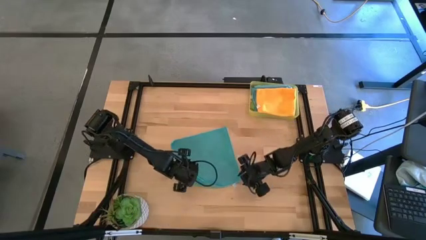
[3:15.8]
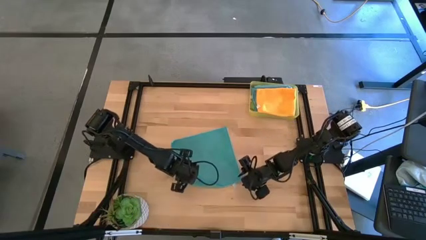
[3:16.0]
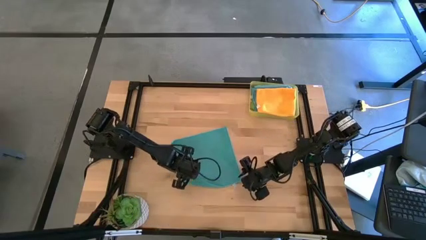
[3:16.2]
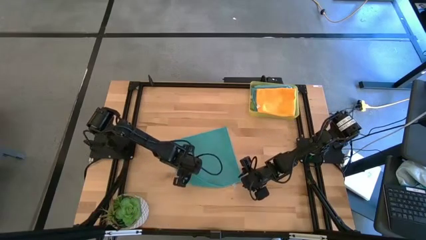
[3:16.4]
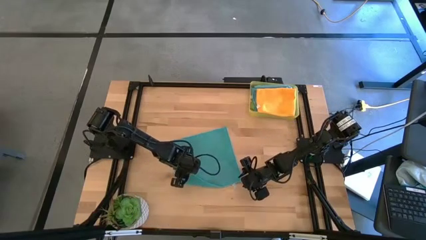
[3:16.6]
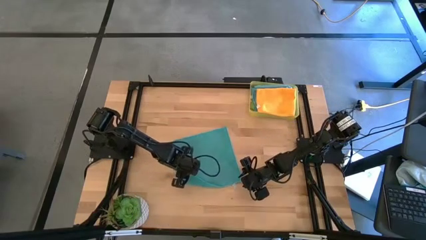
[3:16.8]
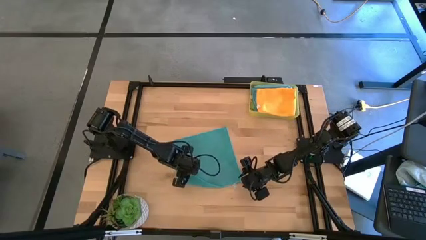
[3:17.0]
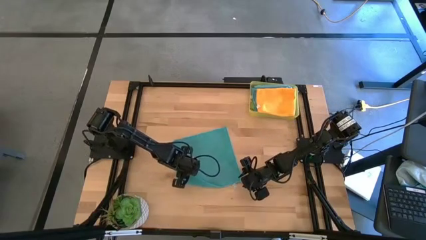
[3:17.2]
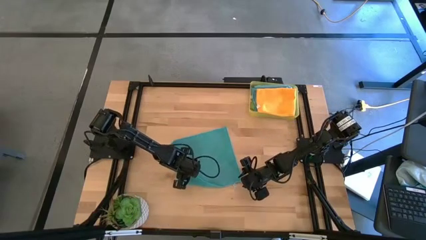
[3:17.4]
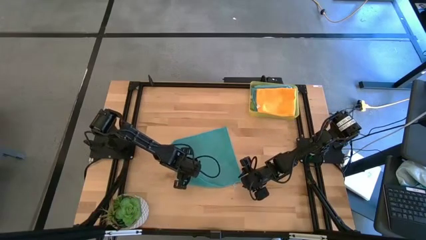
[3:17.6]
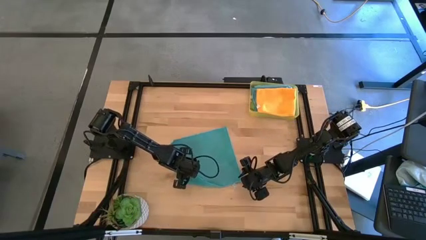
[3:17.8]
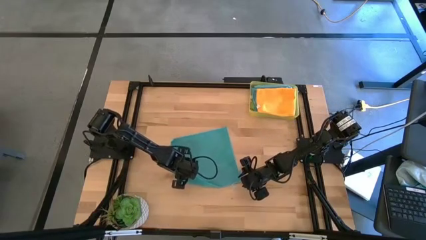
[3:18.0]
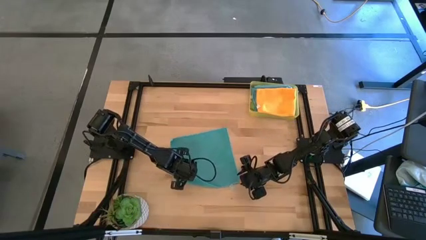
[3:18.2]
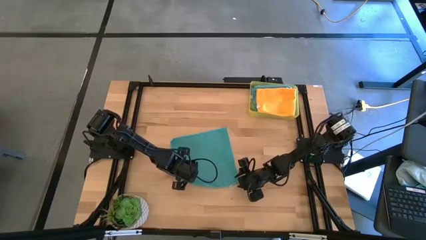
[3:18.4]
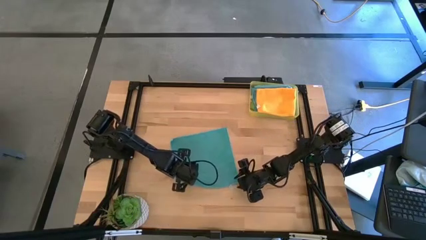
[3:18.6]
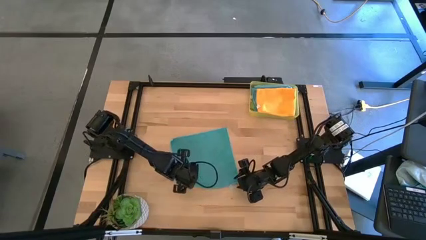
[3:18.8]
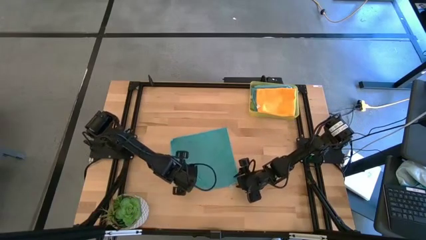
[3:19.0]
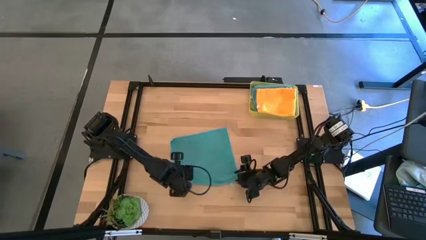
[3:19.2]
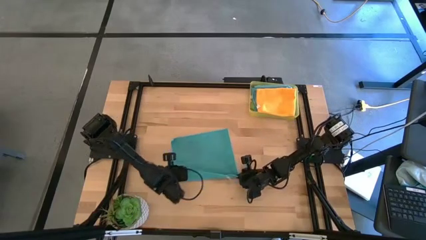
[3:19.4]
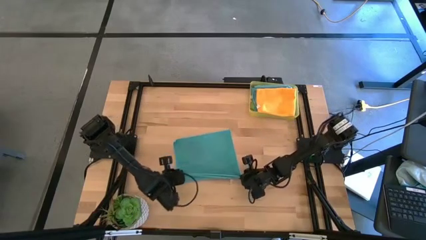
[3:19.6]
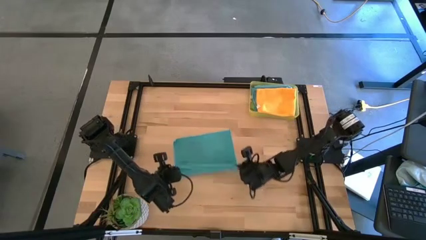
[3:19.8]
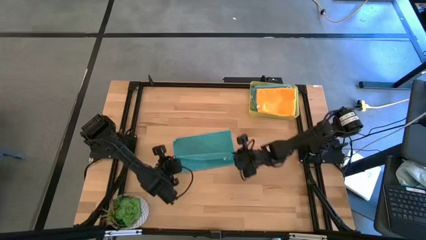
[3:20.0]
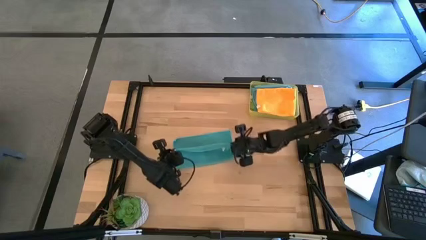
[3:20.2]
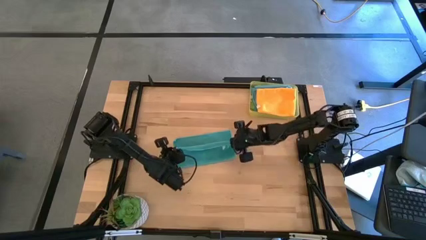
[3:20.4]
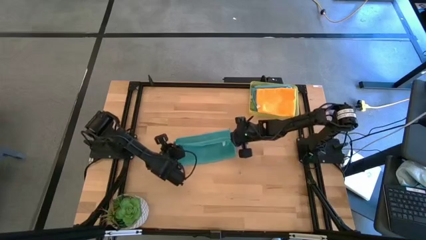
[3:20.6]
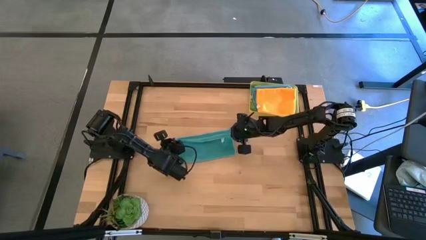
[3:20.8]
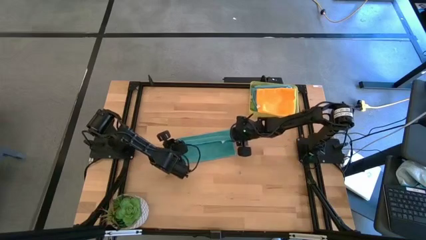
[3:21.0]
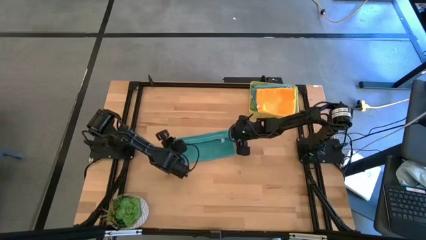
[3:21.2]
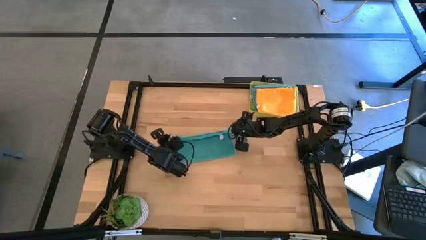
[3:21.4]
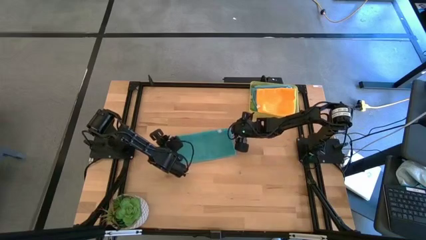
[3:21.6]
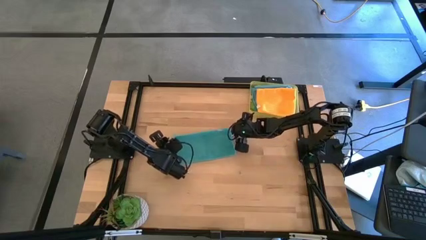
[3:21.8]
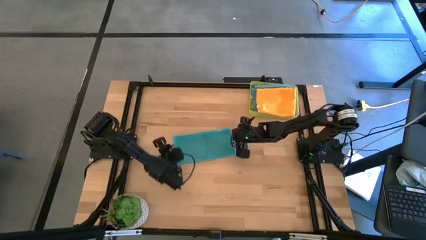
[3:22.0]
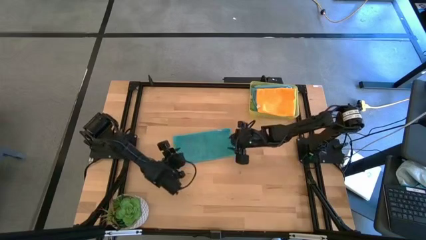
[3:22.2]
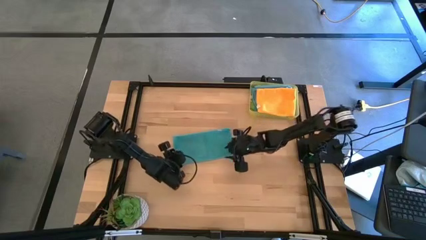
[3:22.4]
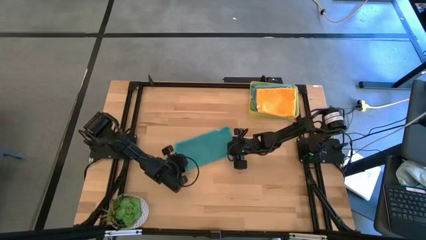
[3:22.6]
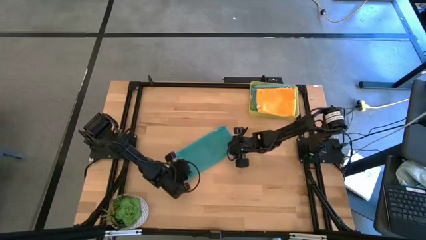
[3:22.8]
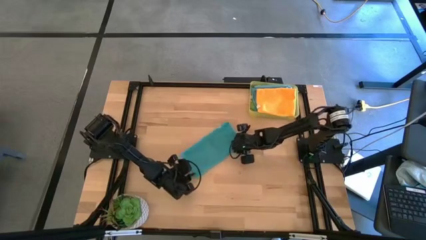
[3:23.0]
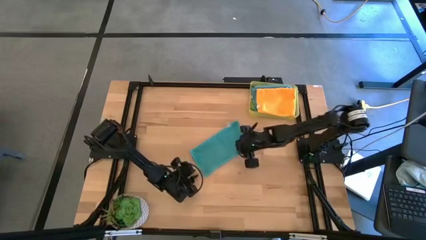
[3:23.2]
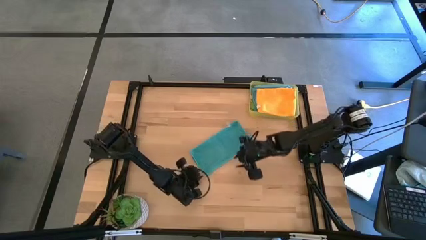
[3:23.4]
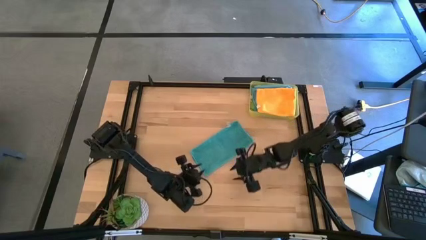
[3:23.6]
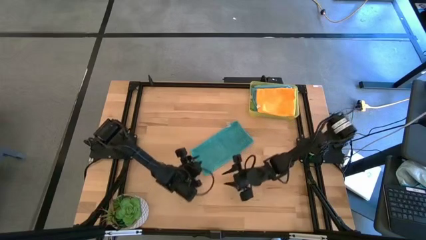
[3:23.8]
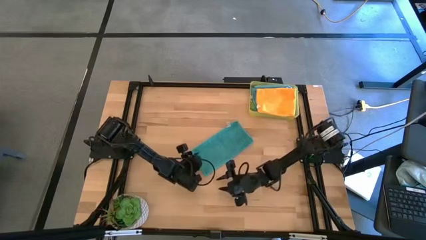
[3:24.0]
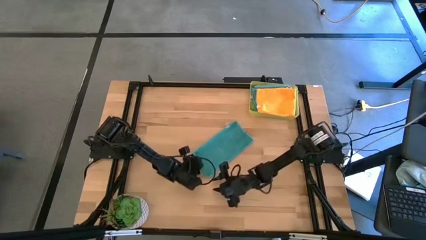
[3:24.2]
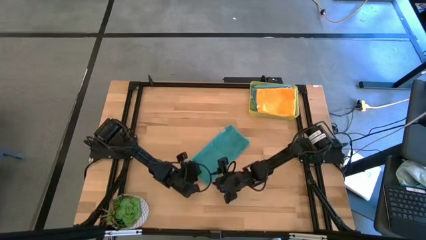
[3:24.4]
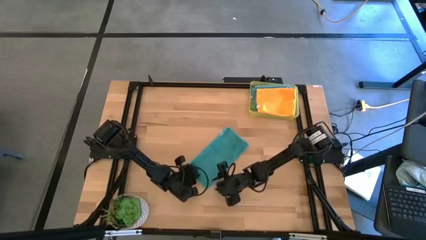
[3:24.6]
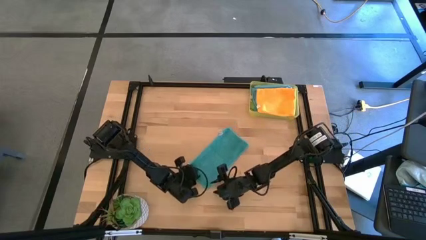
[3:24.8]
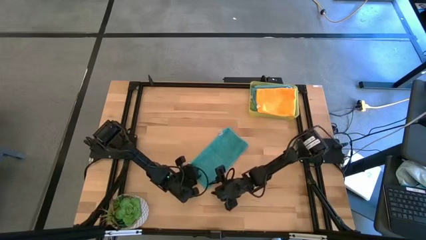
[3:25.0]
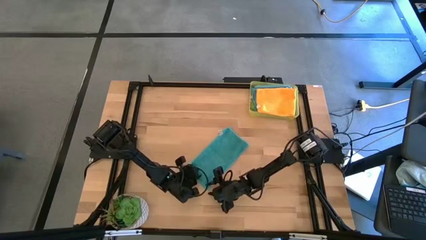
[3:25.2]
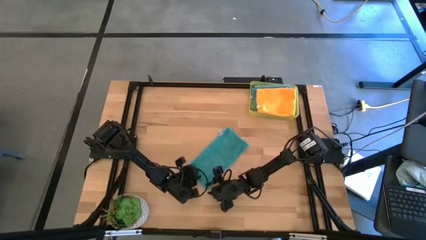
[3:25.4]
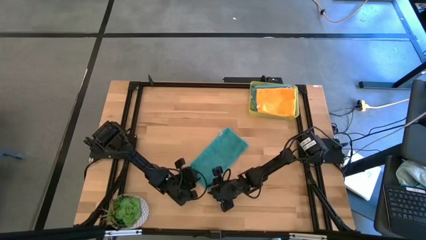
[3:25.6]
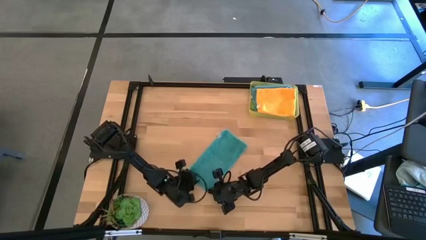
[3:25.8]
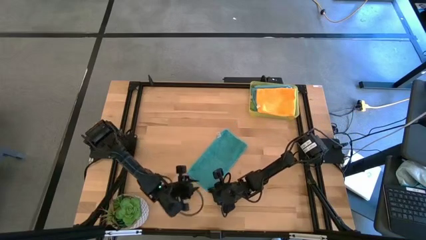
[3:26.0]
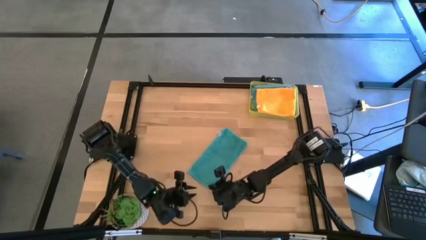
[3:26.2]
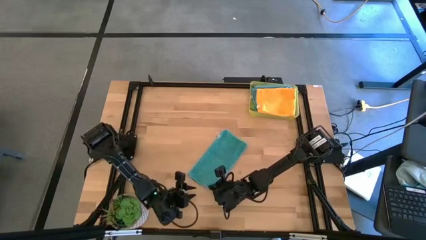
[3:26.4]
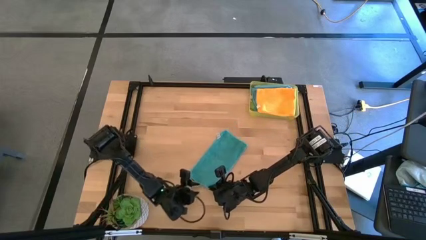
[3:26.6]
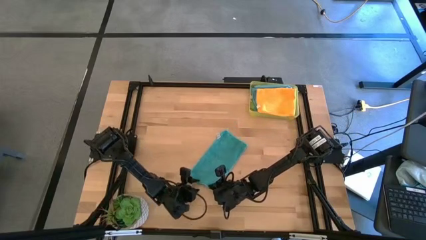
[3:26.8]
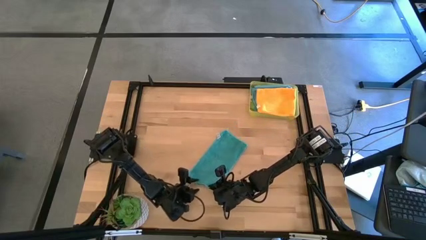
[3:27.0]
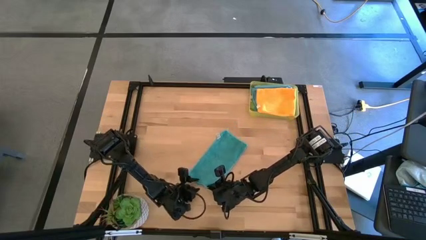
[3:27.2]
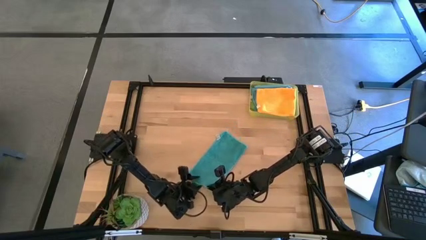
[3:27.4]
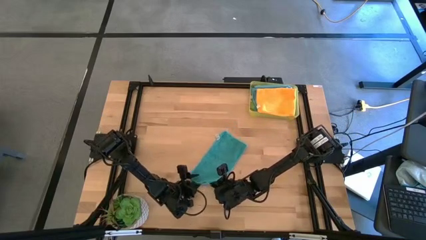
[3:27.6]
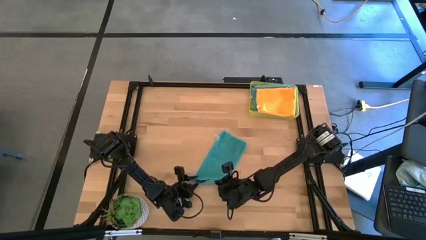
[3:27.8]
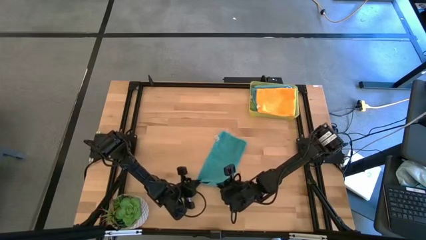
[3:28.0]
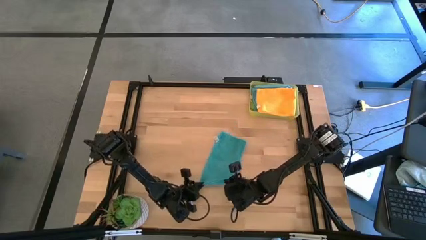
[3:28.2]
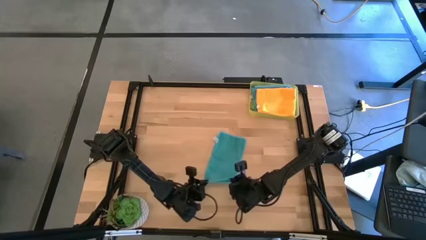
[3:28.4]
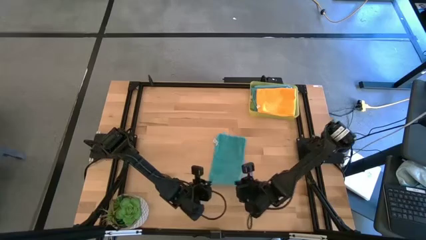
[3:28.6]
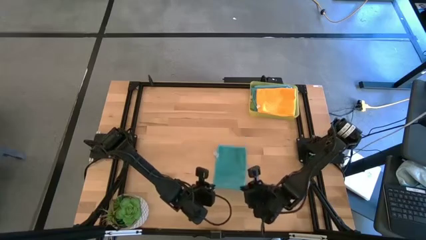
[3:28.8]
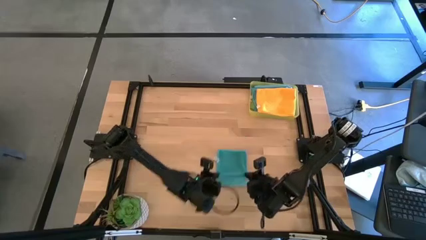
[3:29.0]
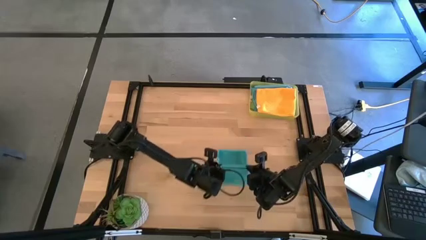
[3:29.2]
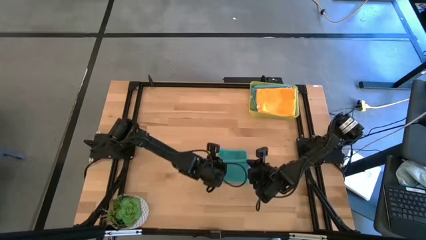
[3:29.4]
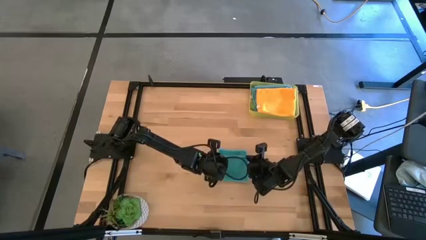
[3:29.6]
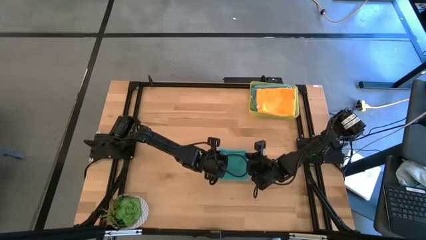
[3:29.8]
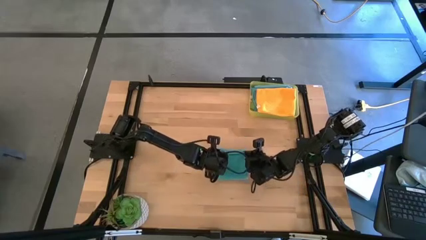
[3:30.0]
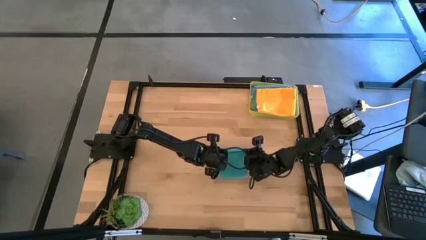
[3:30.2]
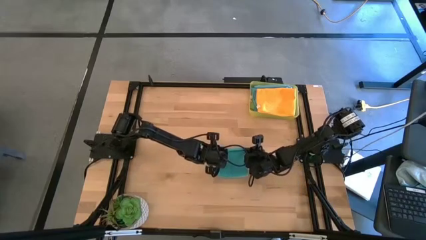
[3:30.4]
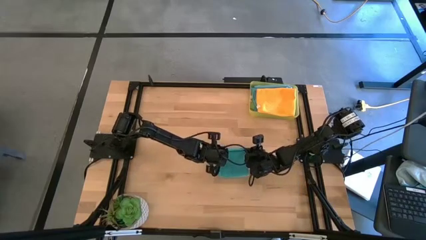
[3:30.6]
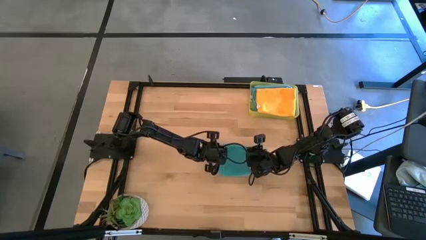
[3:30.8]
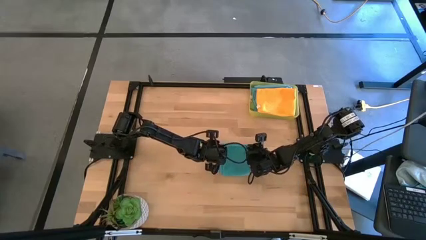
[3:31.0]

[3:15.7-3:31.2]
Task: Fold microfiber towels
Fold the blue microfiber cloth
